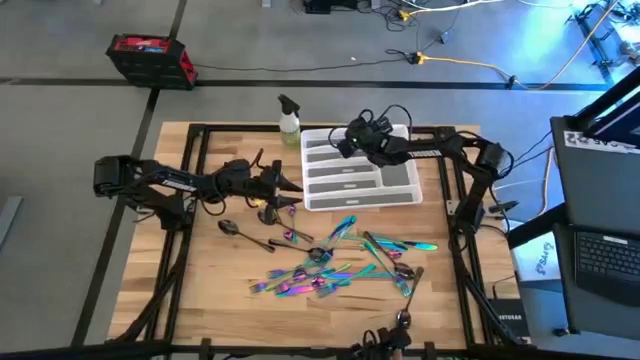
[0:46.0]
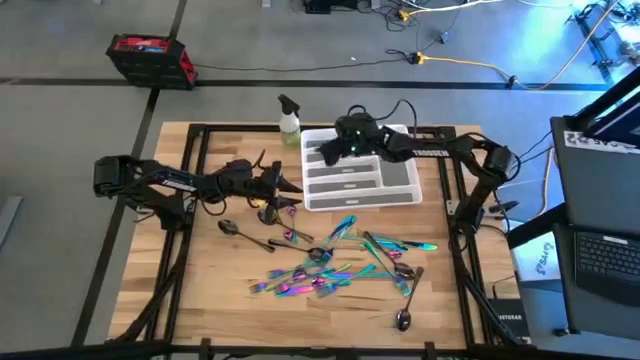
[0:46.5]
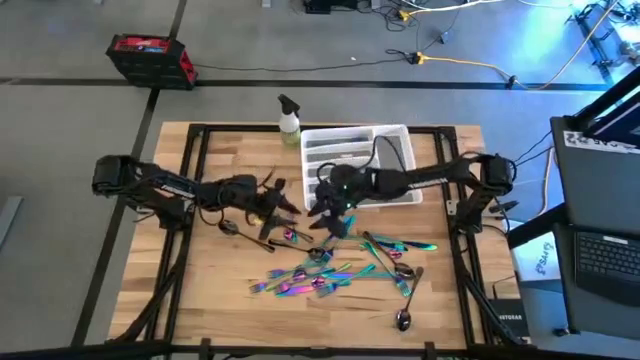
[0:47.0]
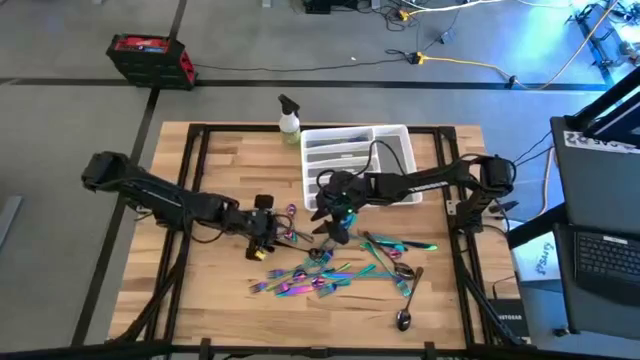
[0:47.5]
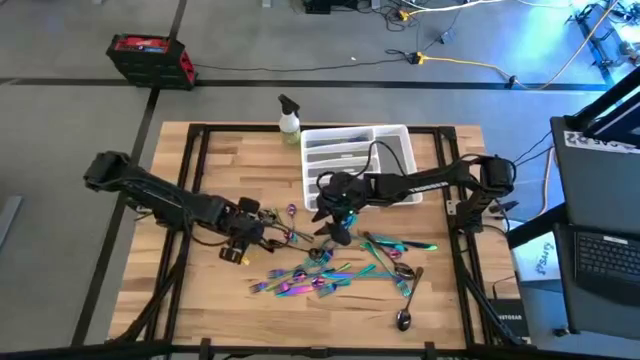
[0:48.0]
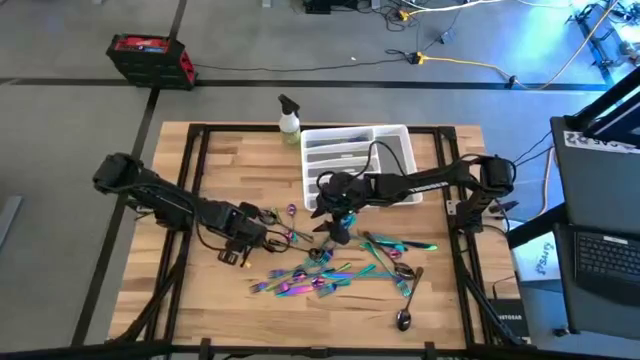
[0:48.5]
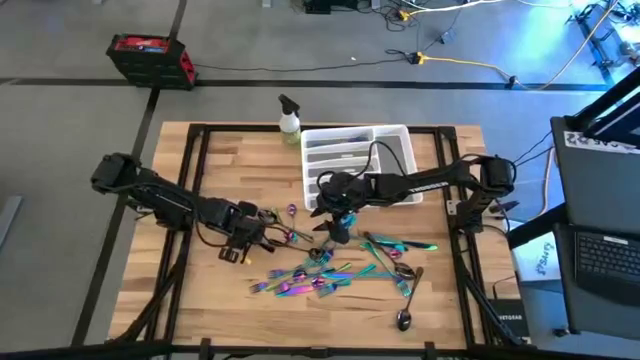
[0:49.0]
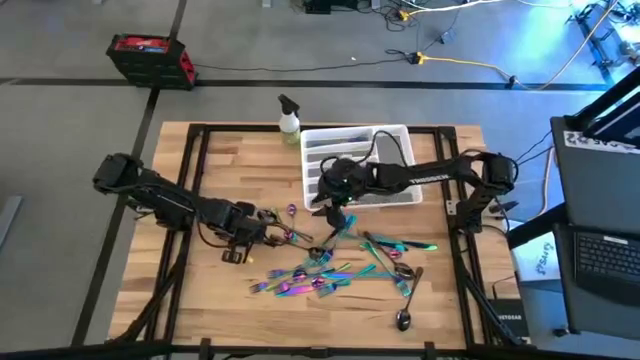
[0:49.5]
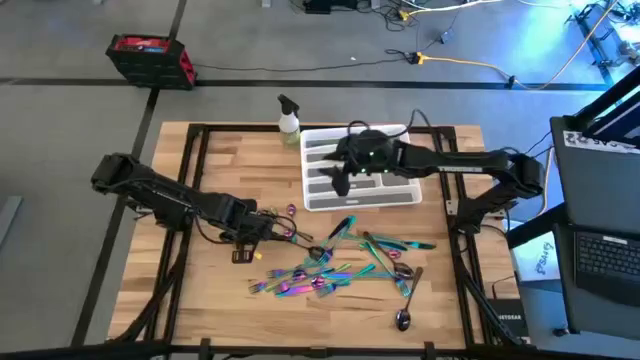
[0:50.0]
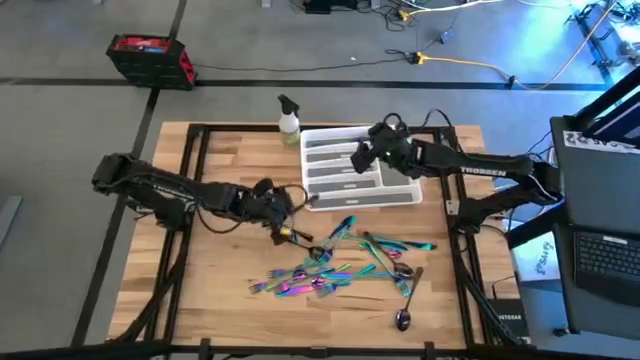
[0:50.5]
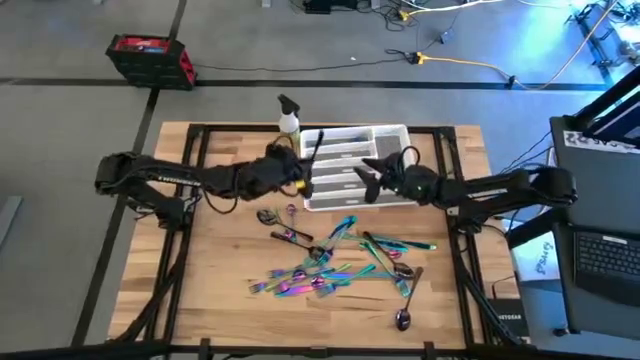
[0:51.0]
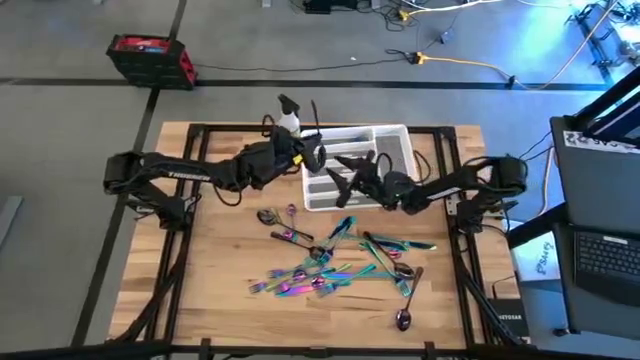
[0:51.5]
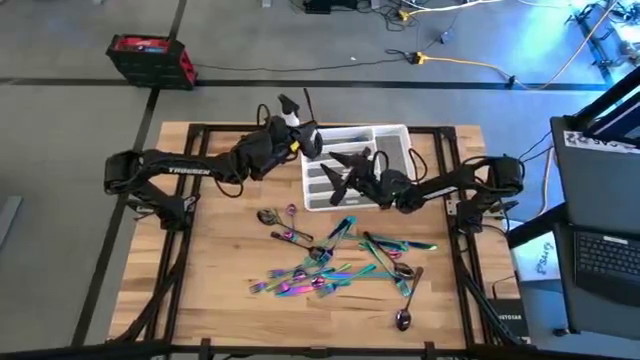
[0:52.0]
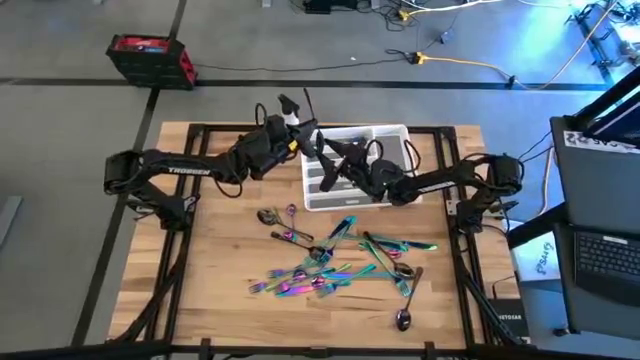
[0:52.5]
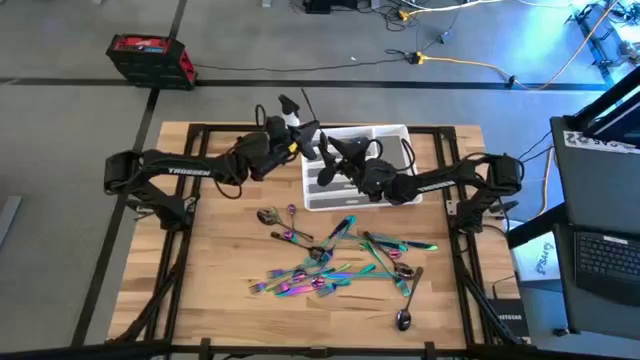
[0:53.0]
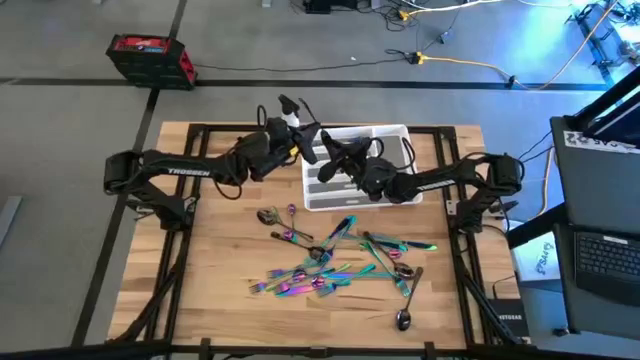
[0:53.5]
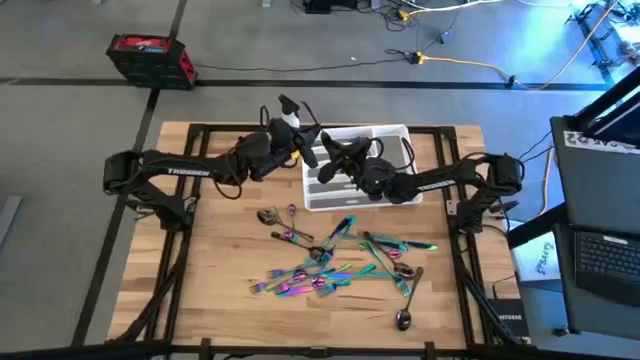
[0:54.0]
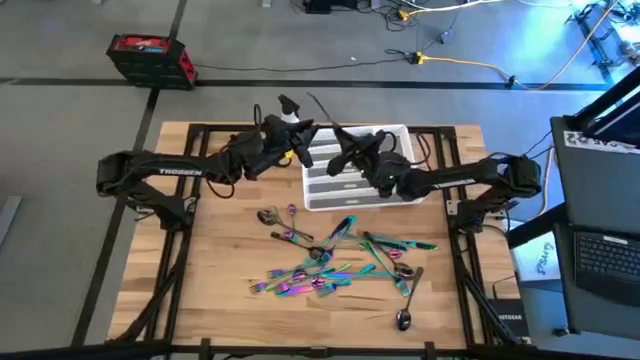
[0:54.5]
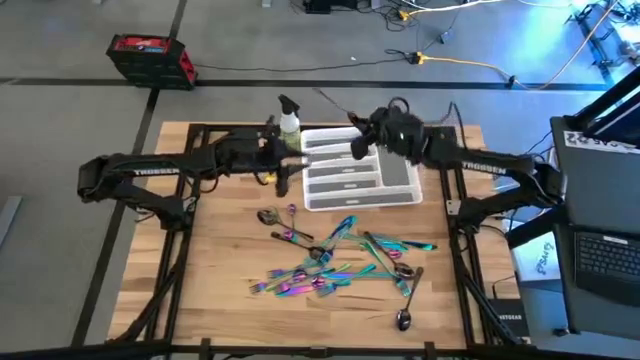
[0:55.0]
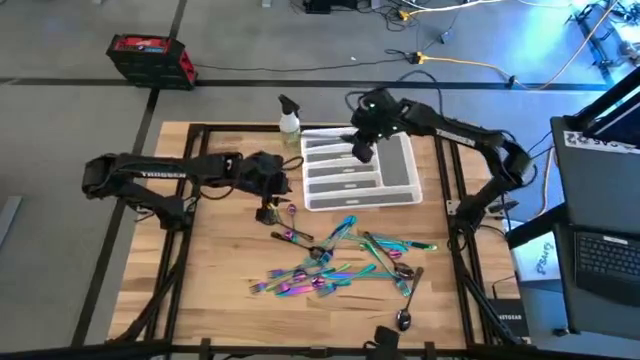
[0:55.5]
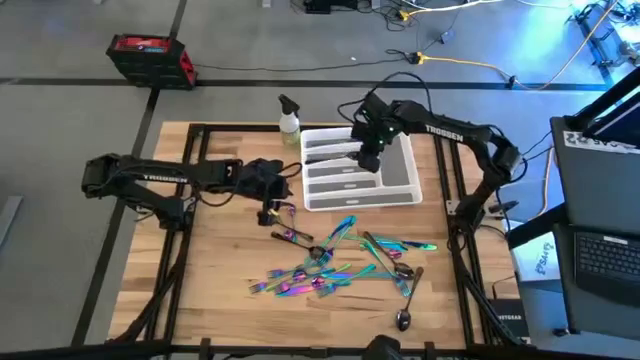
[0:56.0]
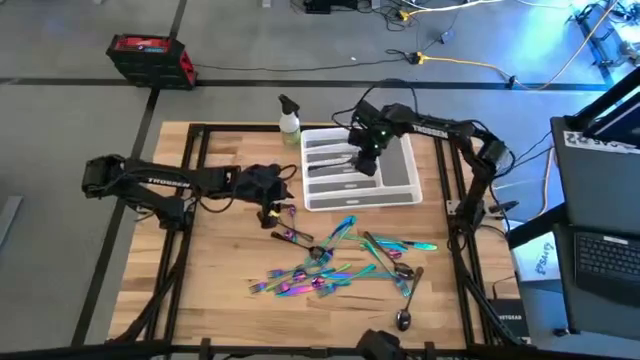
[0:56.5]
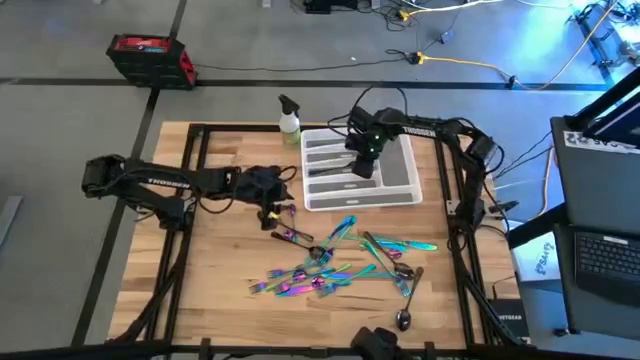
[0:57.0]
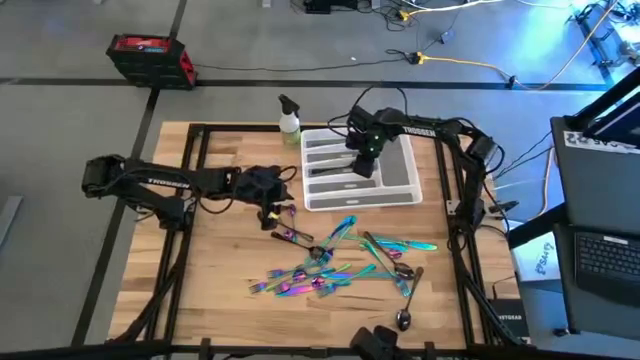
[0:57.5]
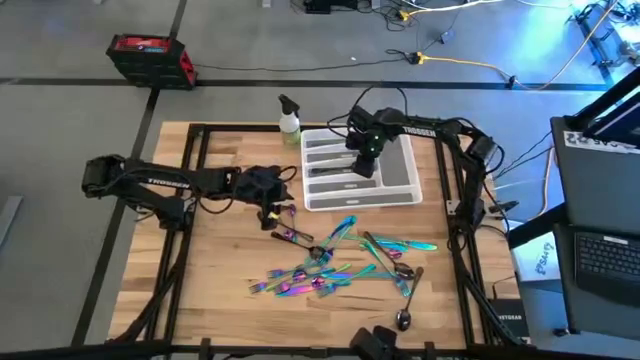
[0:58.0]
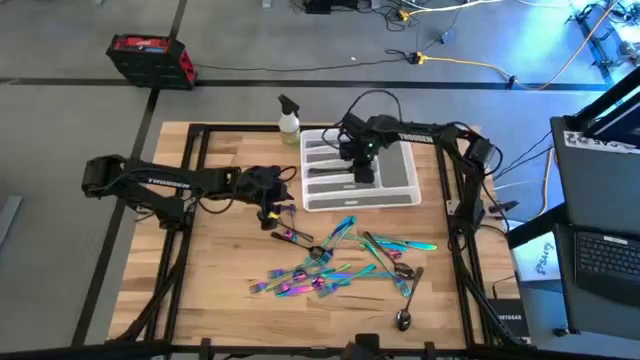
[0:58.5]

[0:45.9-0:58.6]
Task: Sort silverware
Put the black spoon on the white silverware tray

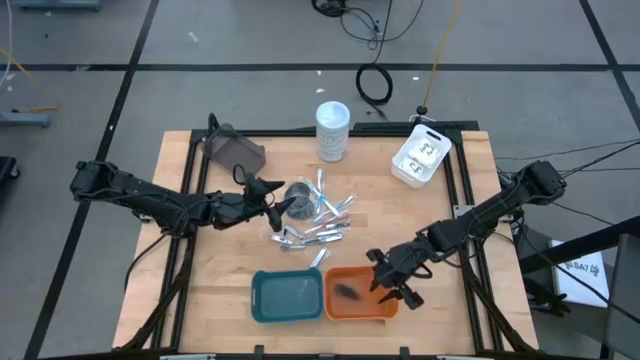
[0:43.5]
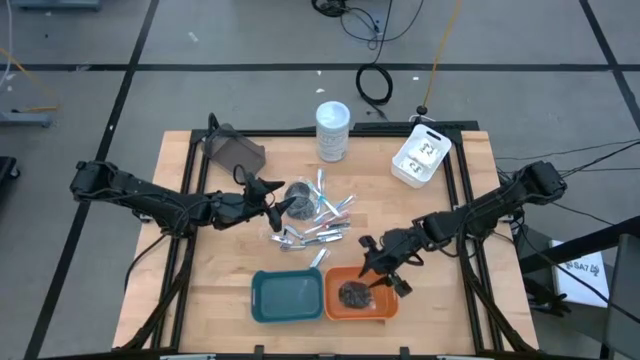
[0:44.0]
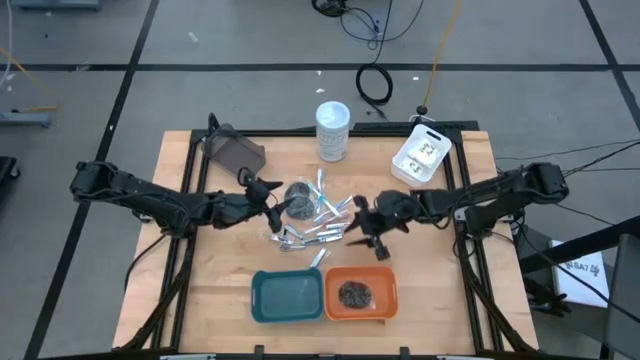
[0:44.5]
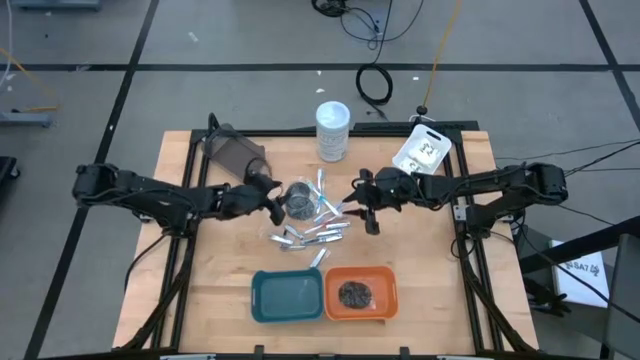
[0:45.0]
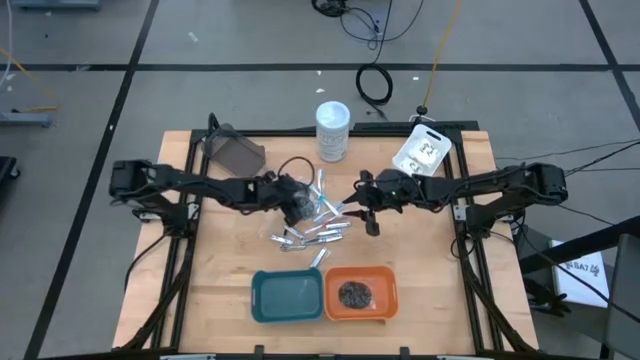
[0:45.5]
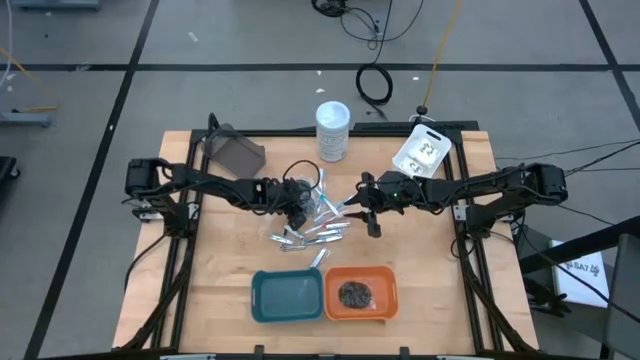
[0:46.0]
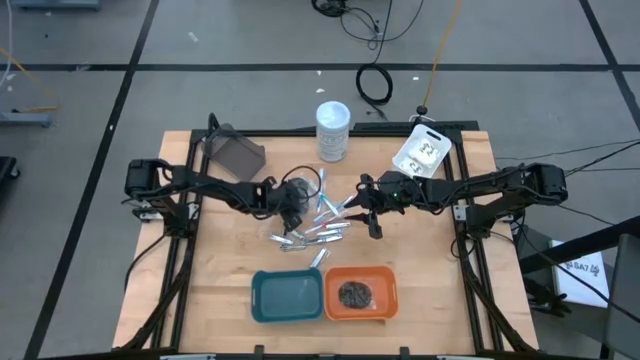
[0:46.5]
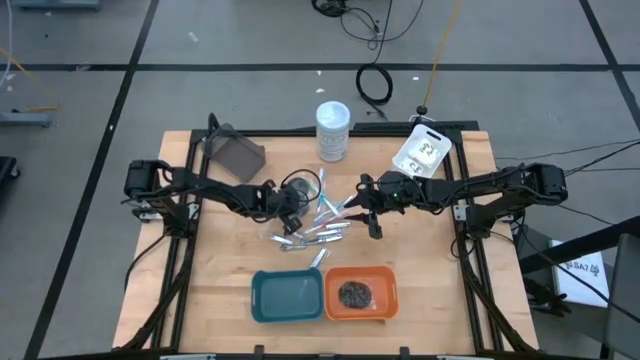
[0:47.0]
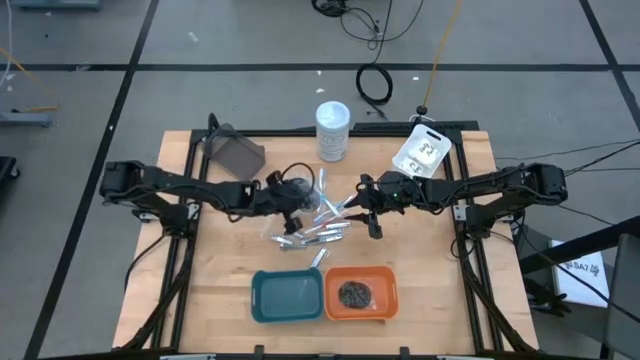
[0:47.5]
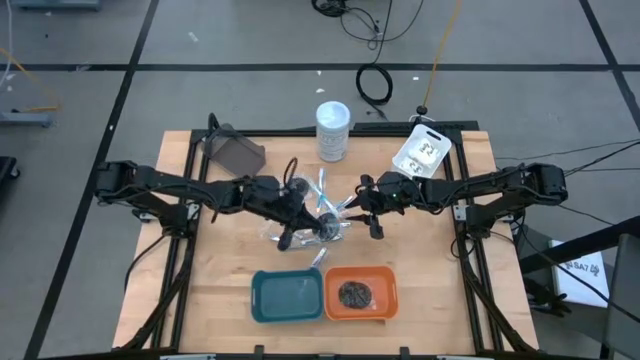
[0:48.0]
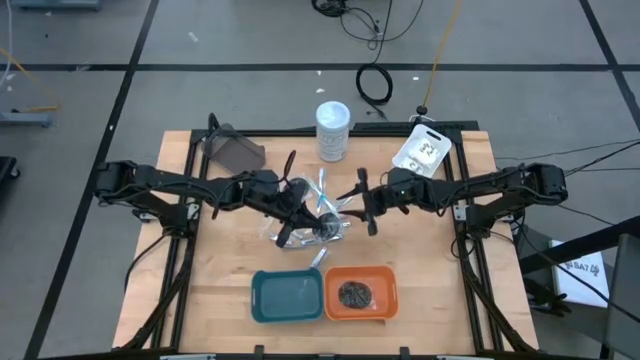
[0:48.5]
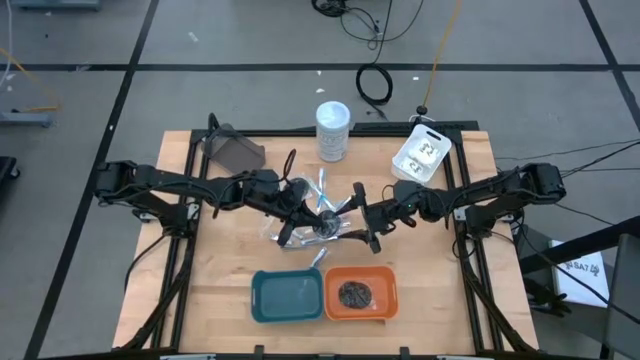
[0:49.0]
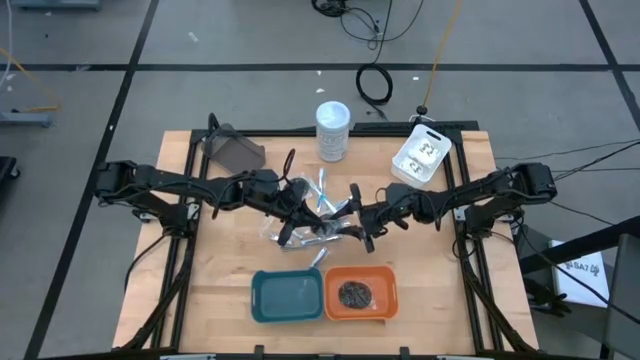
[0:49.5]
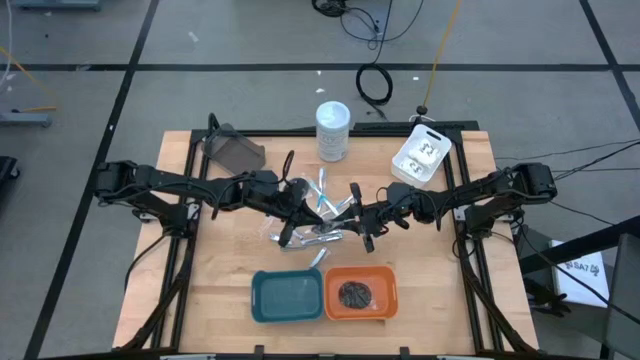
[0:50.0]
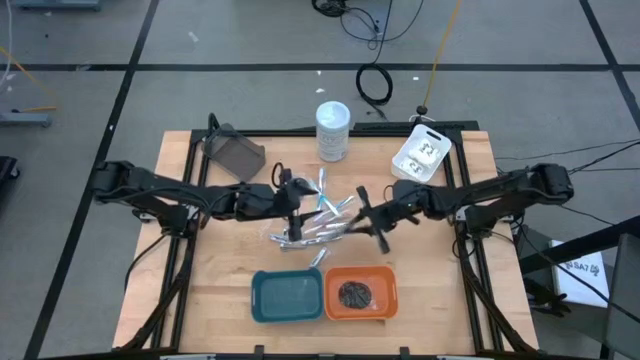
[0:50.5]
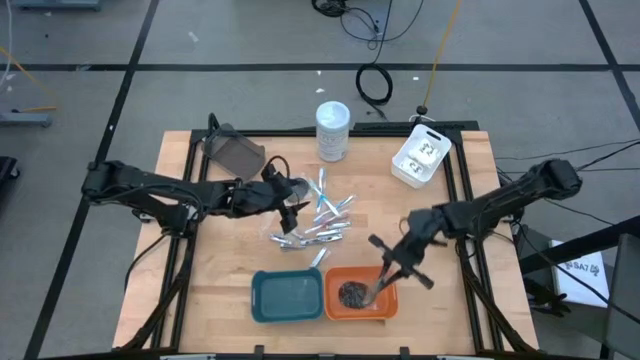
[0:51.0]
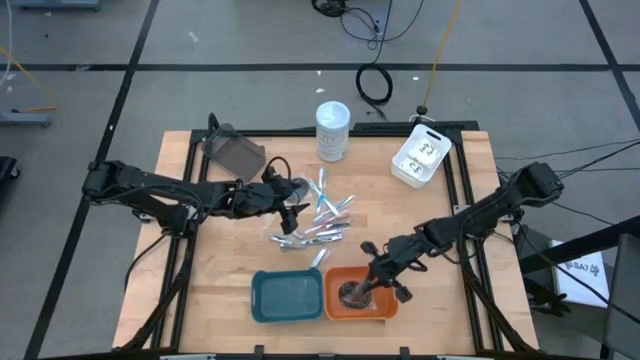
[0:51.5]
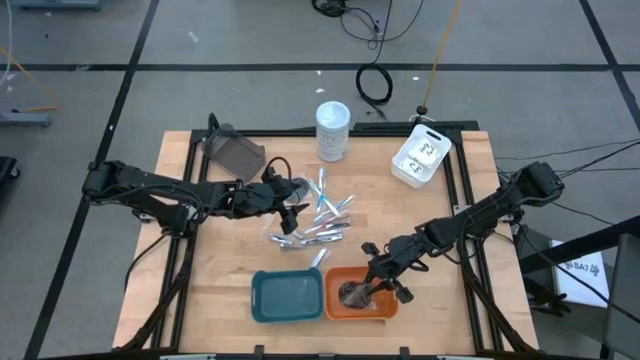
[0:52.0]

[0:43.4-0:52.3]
Task: Pick & Place Travel size toiletries
Put the black hairbrush into the orange bin

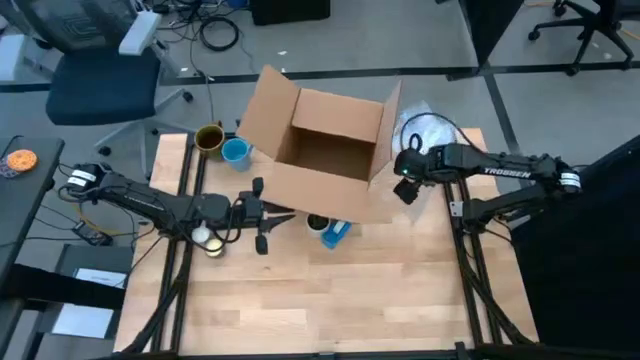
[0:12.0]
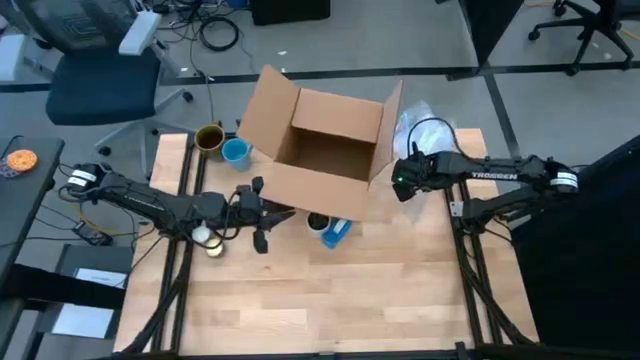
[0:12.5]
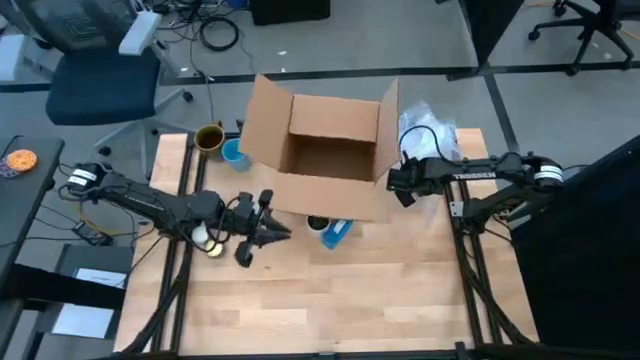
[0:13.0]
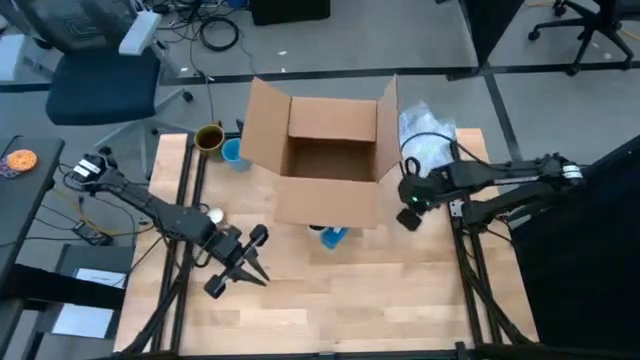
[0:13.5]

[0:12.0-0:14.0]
Task: wrap mug
Prepare the bubble wrap on the table
